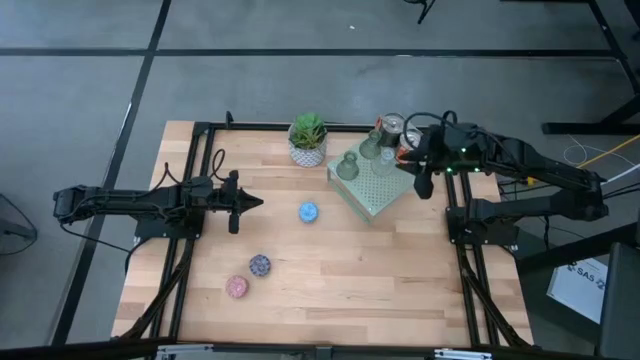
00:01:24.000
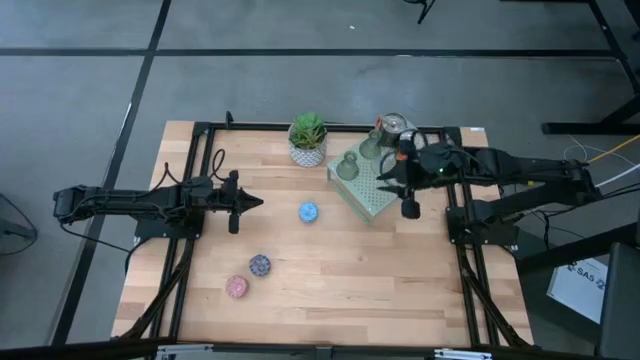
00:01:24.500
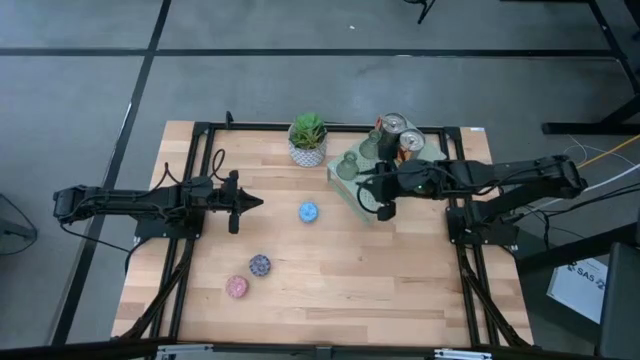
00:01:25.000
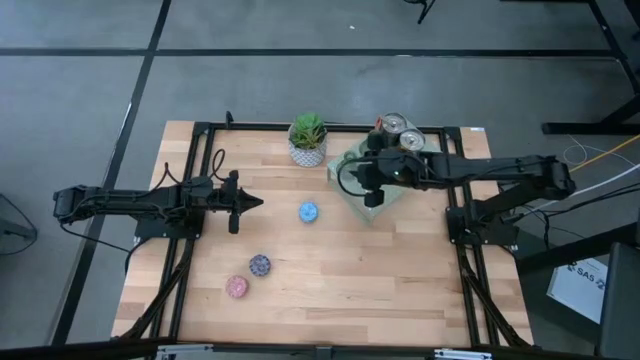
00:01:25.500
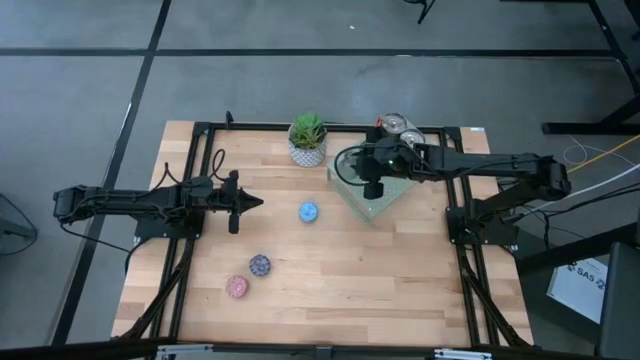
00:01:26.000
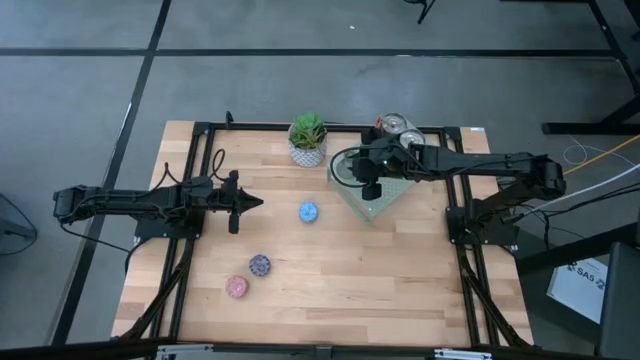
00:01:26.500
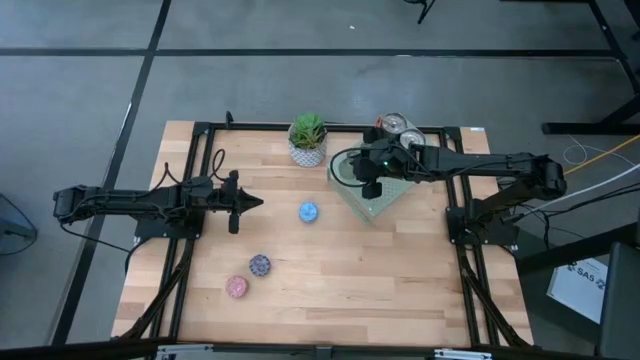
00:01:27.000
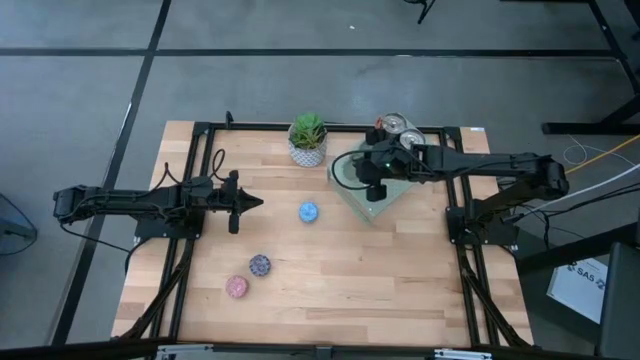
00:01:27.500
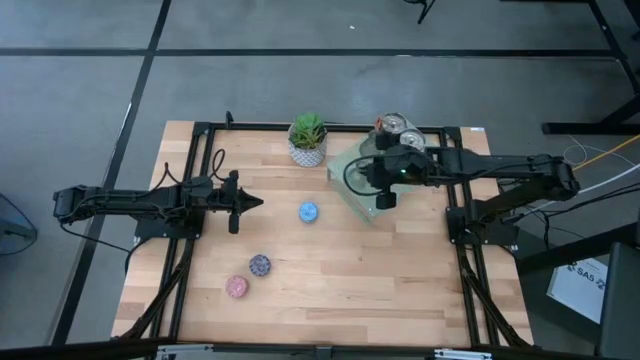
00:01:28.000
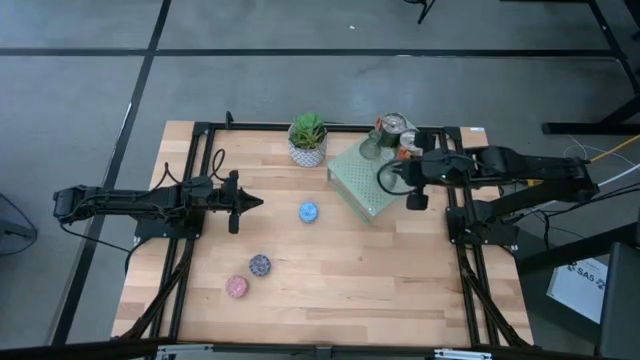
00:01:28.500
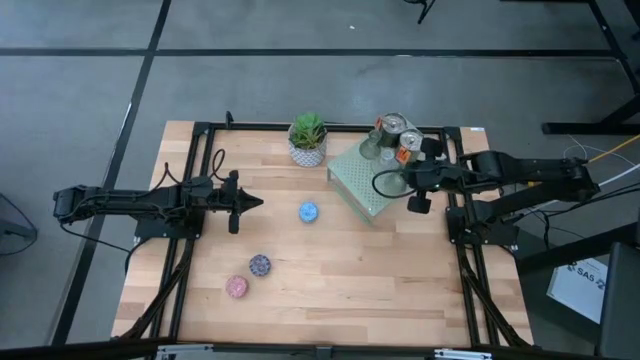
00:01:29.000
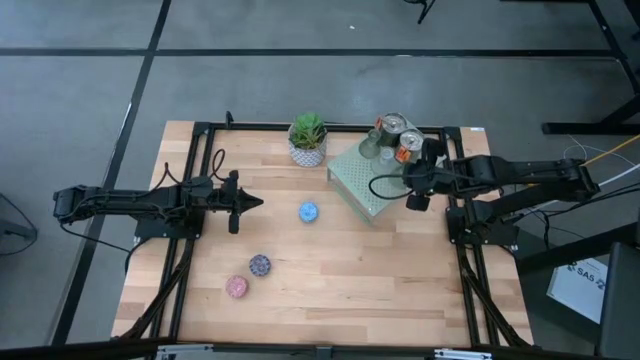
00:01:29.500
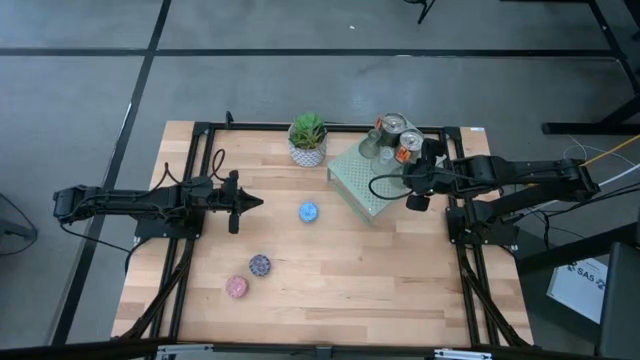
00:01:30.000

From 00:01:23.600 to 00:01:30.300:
Task: Pick & Place candle stick holders
Adjust the green candle holder on the shelf

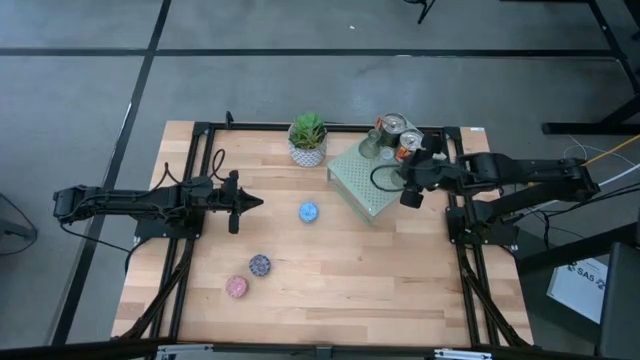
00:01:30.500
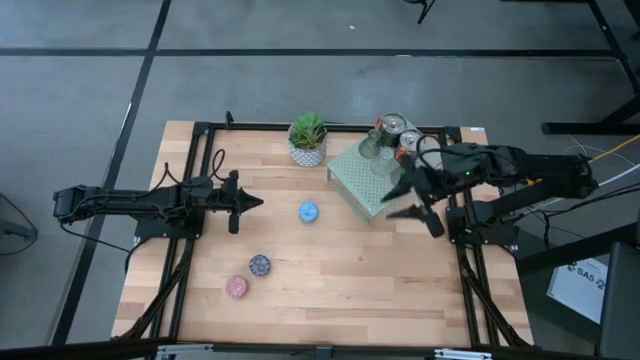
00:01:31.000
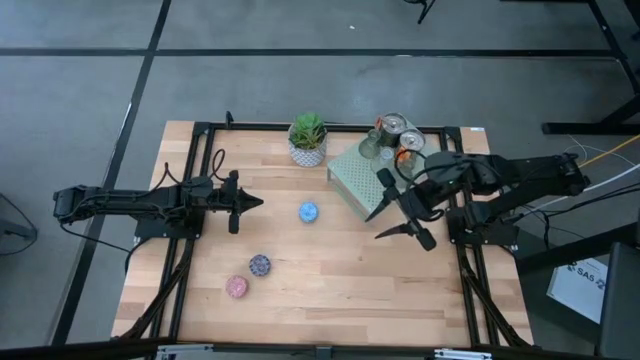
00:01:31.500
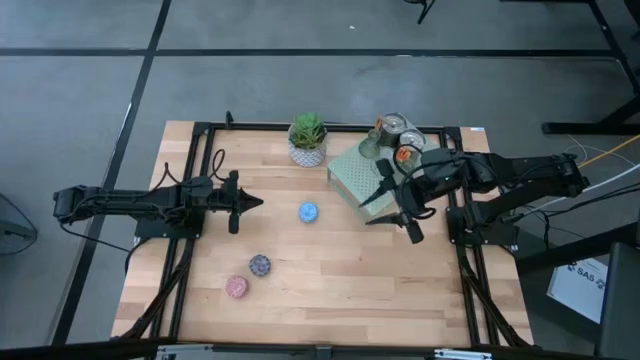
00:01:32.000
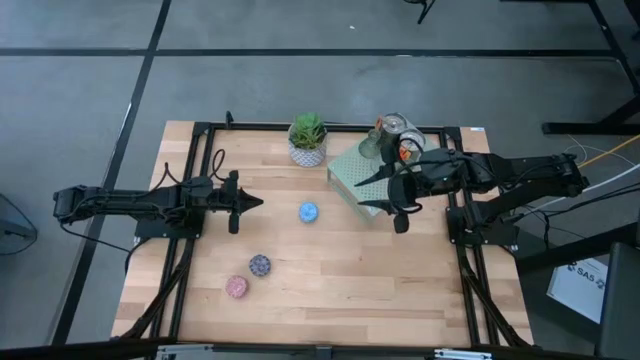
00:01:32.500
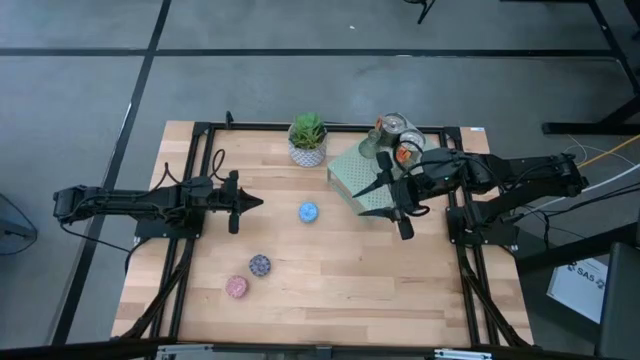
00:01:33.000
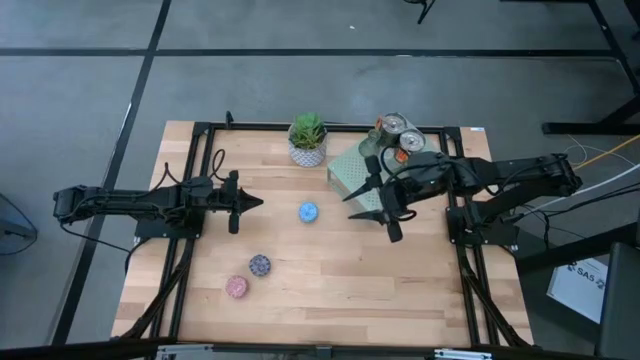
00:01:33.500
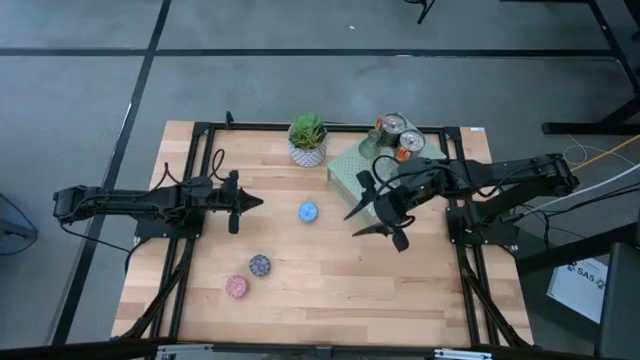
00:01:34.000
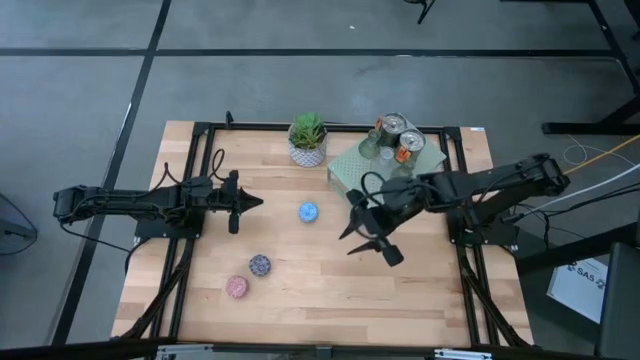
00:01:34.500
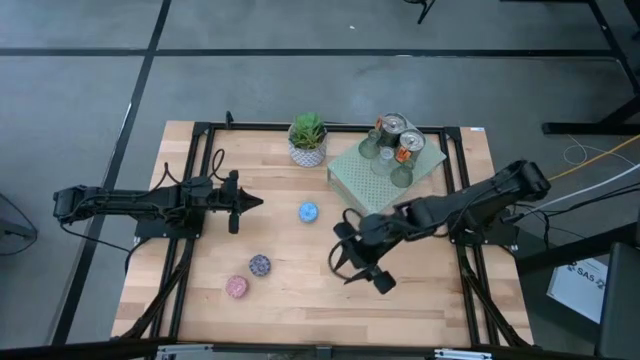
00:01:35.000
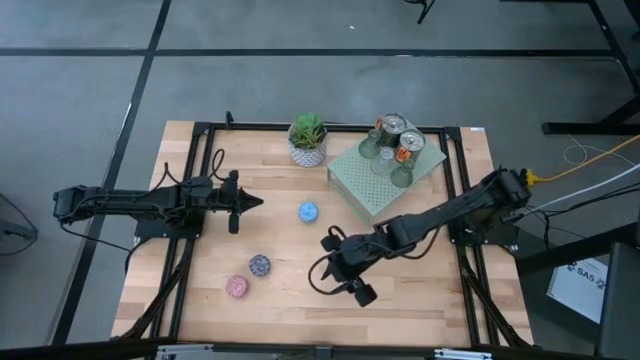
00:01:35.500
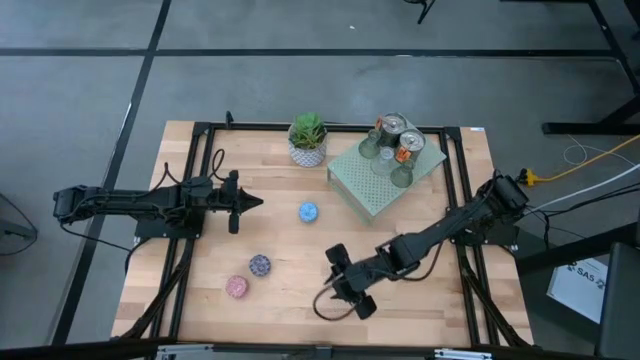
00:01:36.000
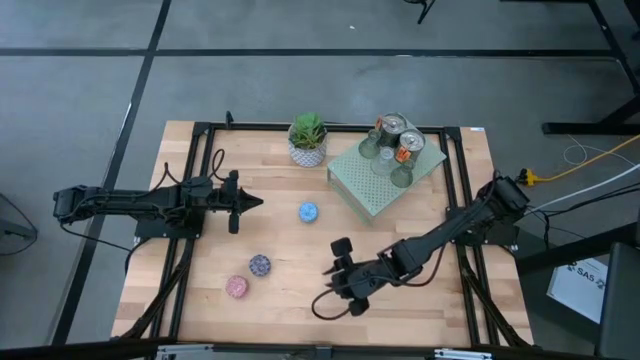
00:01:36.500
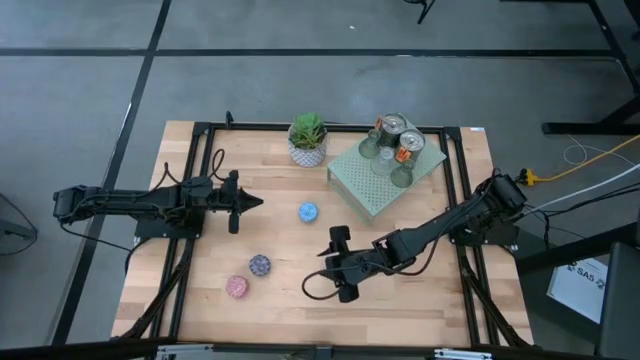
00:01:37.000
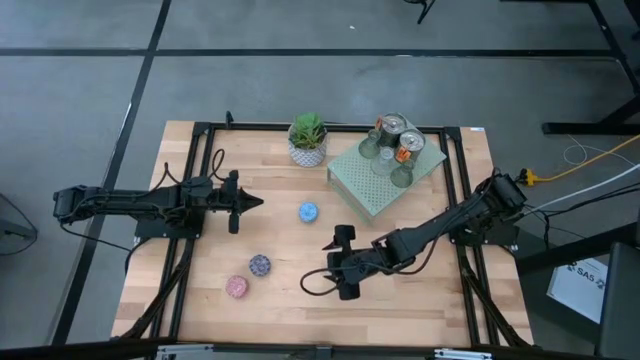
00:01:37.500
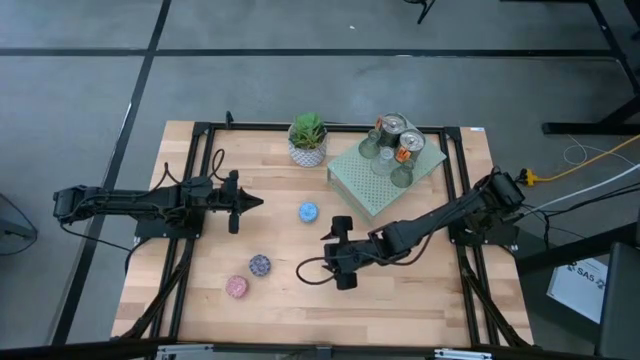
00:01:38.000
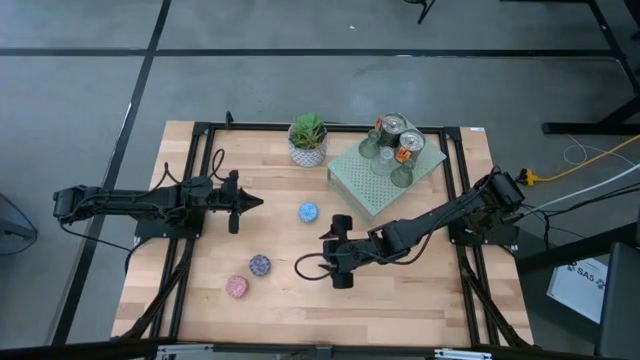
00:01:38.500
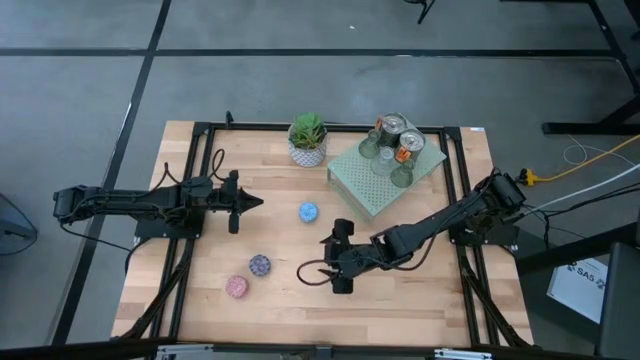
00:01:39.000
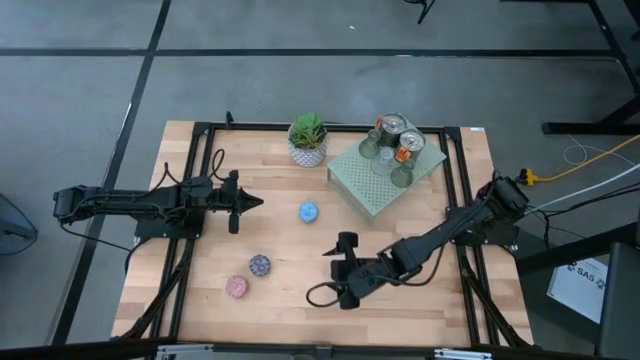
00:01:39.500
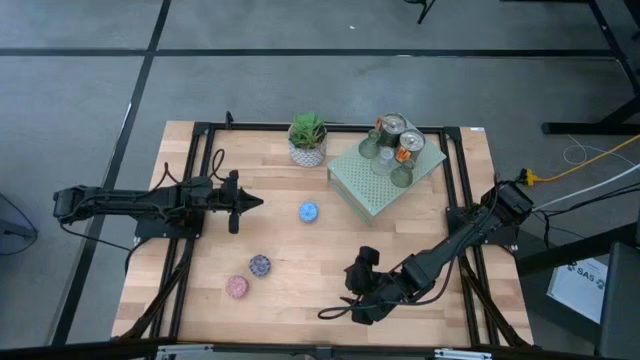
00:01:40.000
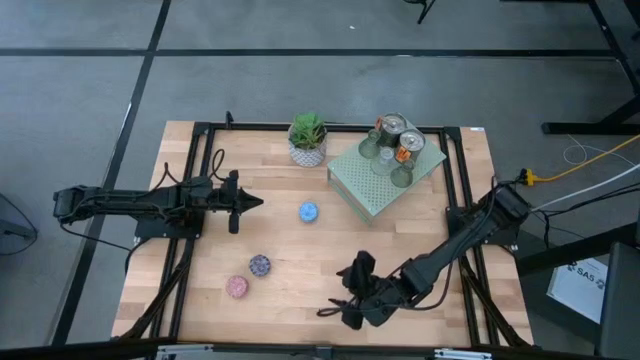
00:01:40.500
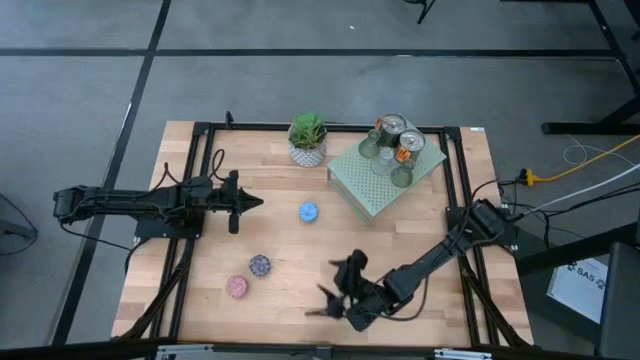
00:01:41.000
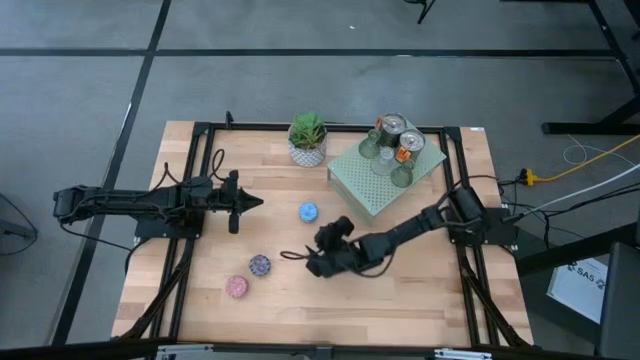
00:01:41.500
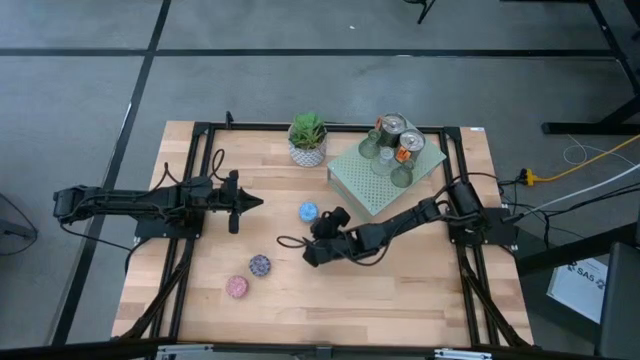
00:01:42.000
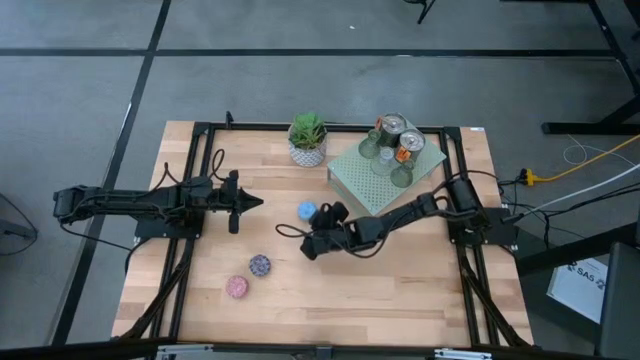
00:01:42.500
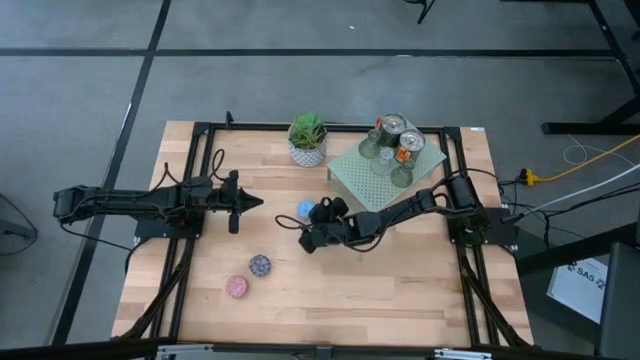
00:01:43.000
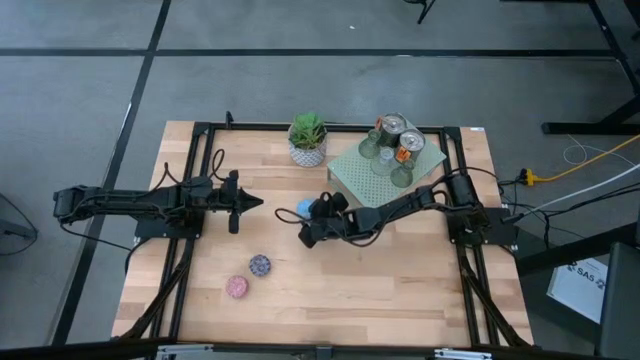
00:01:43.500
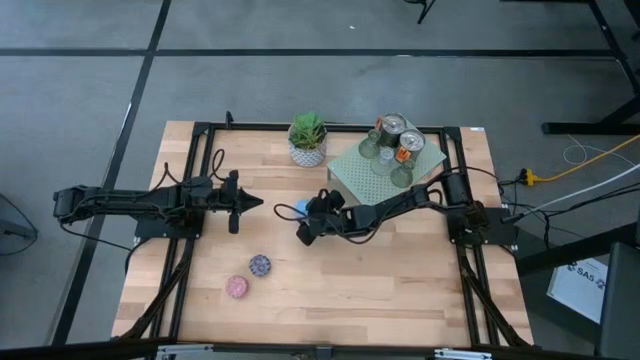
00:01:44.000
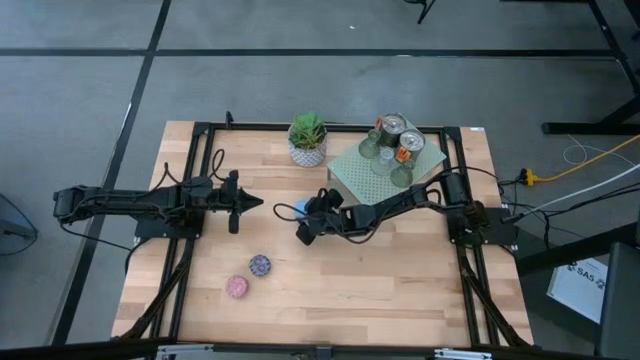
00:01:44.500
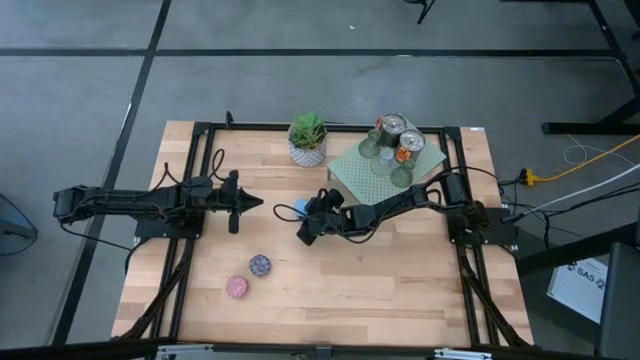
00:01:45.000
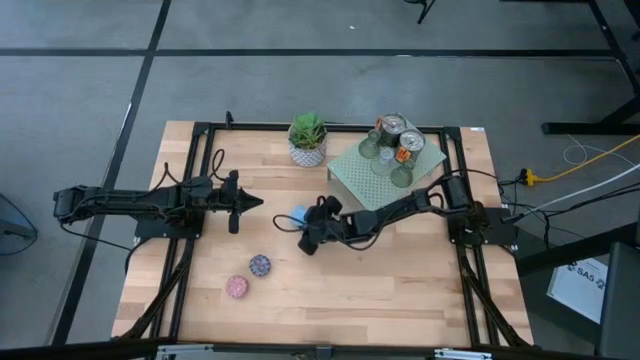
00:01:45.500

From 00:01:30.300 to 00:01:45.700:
Put the blue scented candle on the shelf
